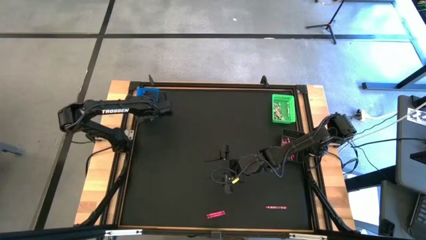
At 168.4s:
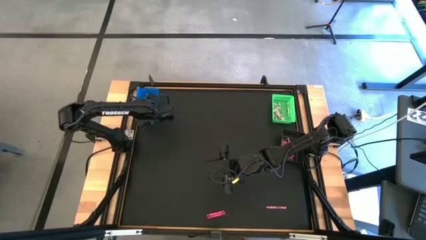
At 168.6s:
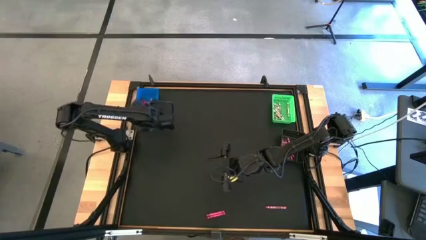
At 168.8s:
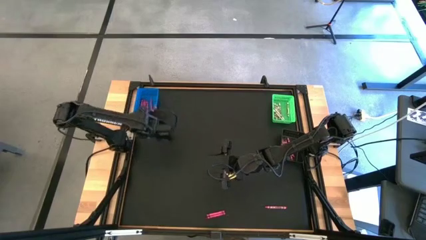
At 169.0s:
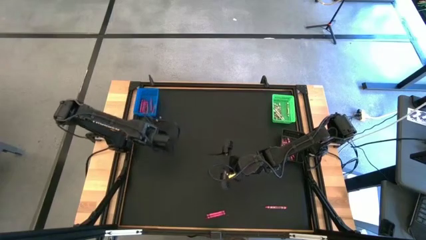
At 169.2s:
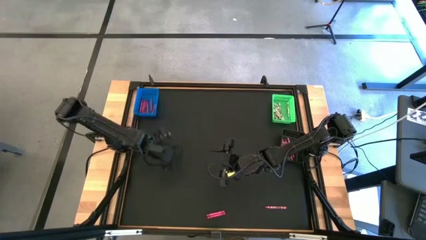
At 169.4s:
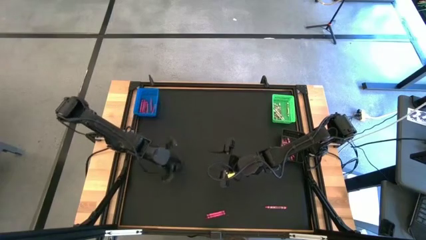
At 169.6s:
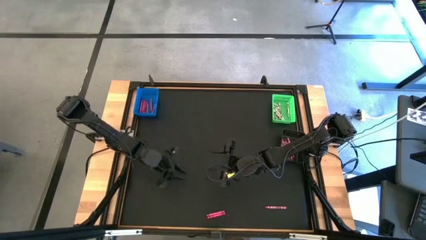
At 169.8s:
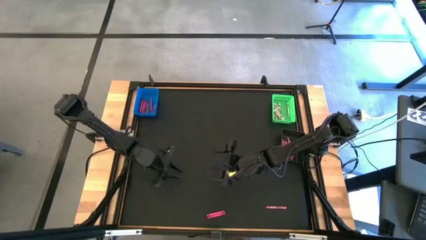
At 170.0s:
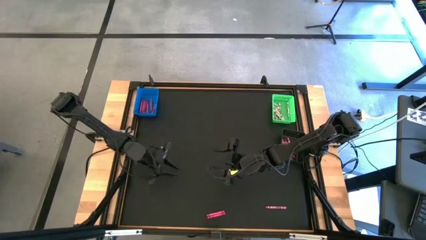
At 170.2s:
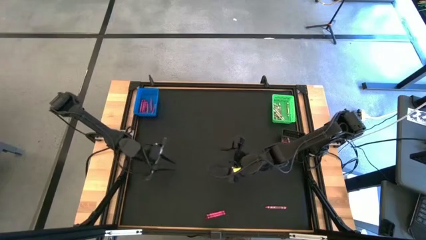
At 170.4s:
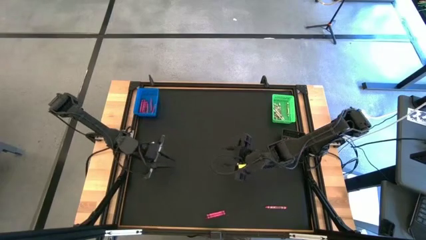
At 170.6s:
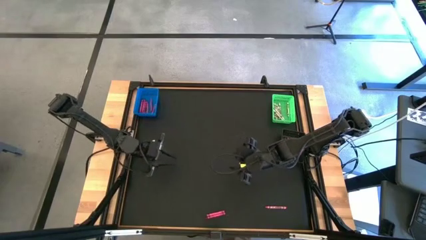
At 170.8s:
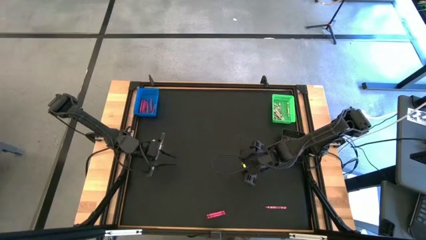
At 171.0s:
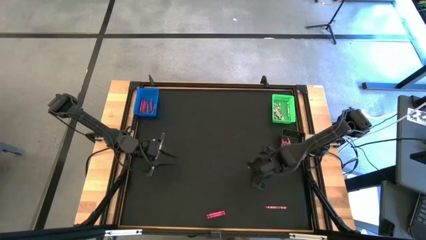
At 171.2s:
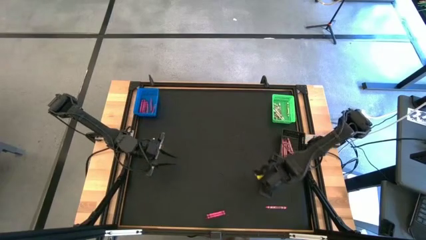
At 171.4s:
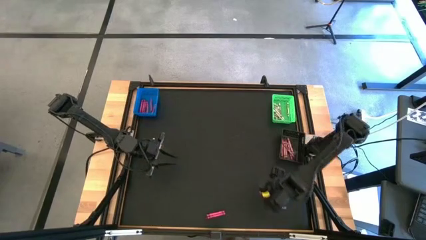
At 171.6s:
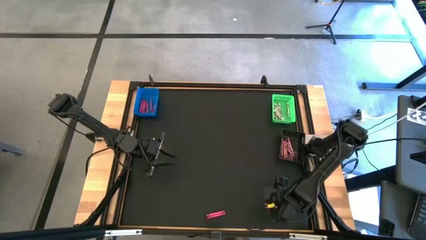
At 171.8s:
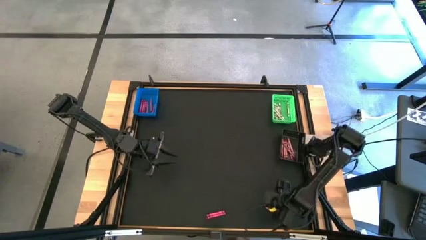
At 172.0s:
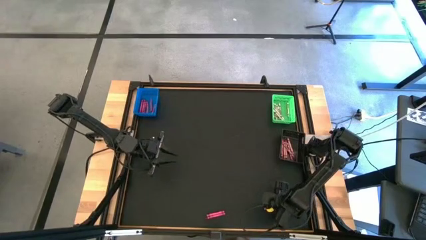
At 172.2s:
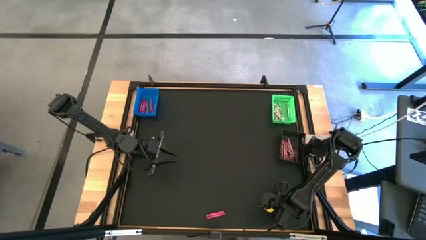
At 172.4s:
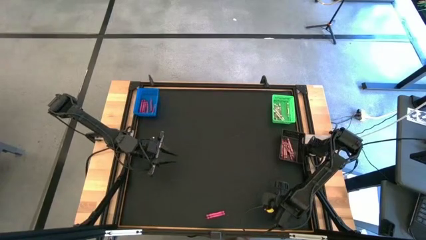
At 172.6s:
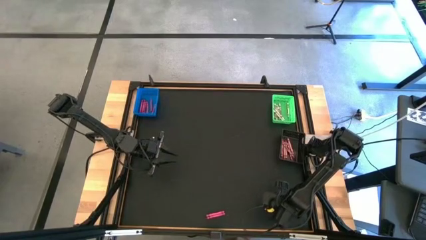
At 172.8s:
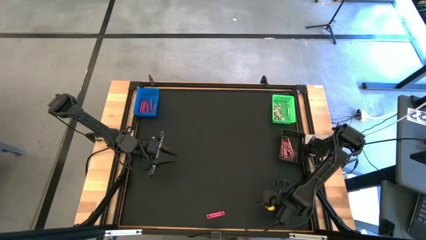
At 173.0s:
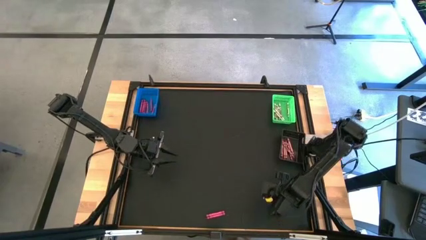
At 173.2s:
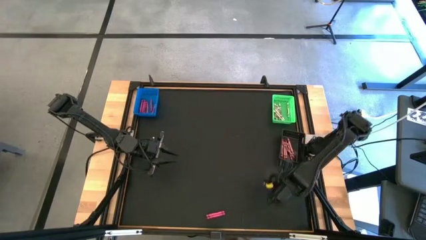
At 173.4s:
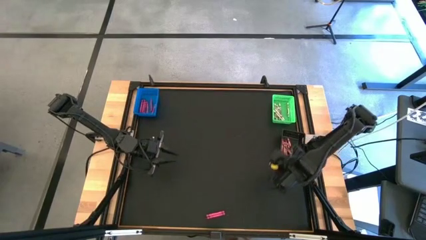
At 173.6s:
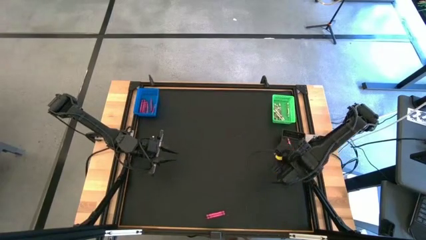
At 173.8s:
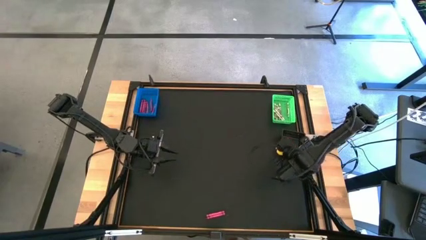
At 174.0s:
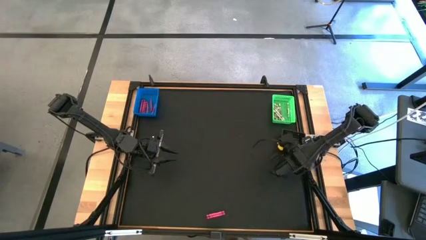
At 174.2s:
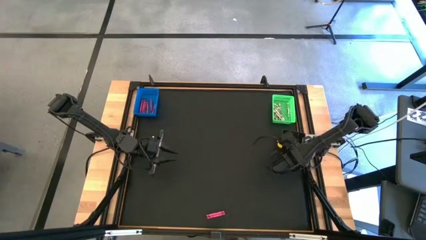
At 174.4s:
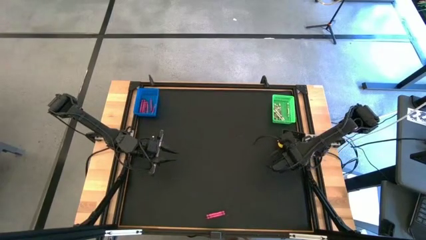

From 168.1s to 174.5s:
Task: Sort crayons
Put the pink crayon into the black bin

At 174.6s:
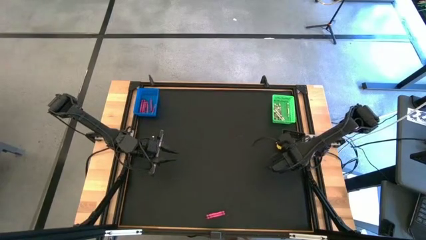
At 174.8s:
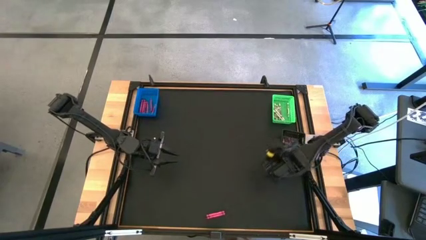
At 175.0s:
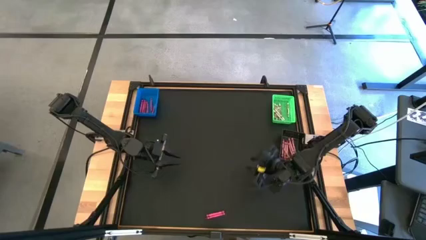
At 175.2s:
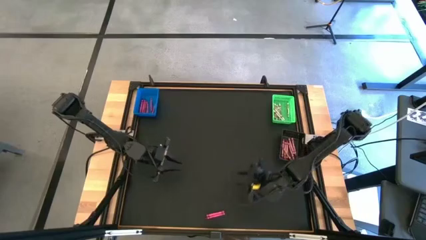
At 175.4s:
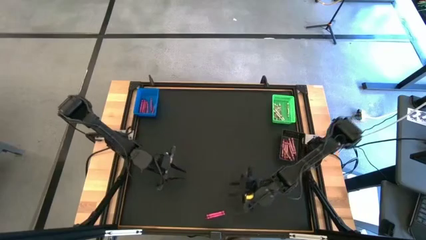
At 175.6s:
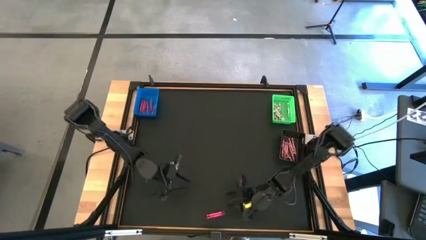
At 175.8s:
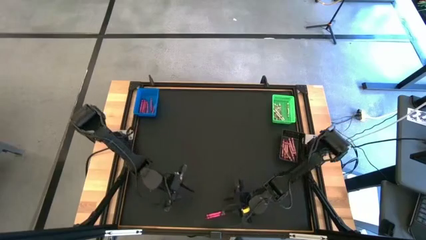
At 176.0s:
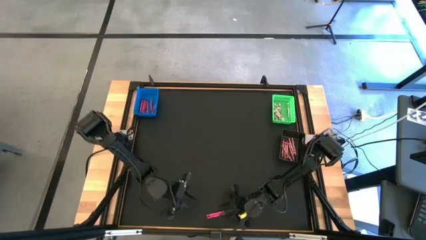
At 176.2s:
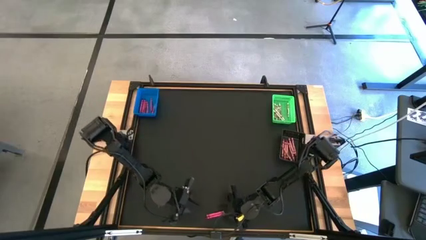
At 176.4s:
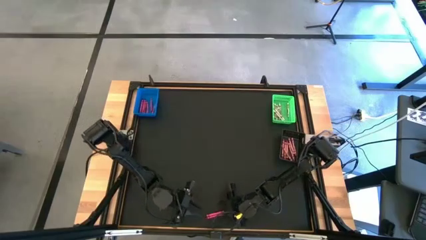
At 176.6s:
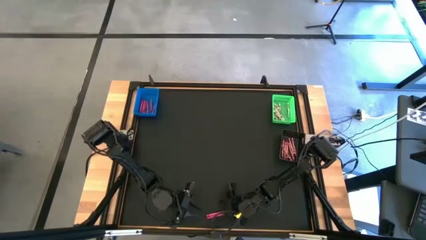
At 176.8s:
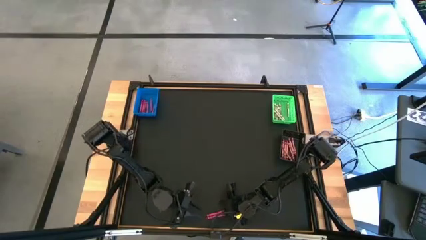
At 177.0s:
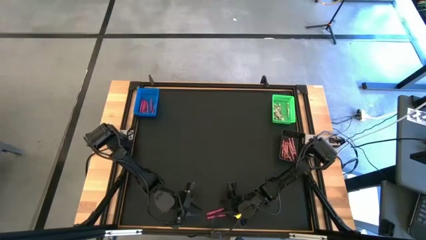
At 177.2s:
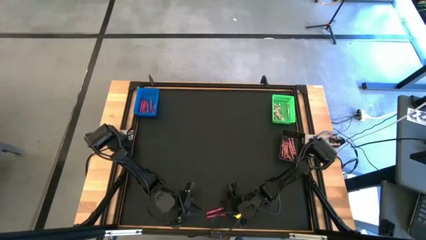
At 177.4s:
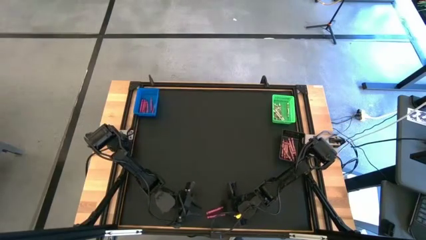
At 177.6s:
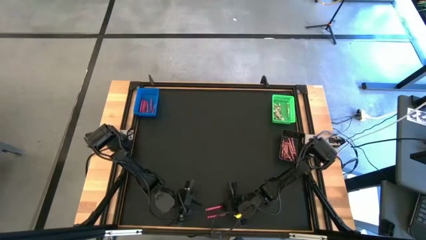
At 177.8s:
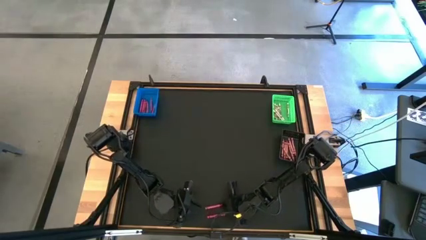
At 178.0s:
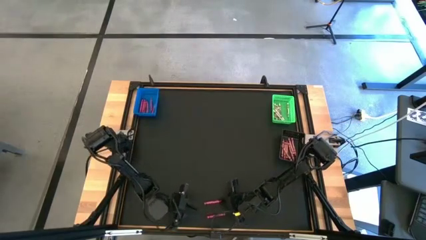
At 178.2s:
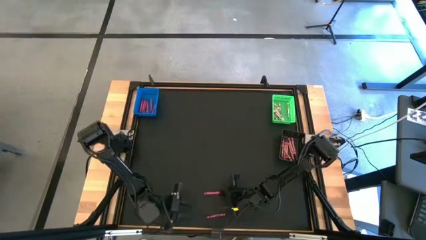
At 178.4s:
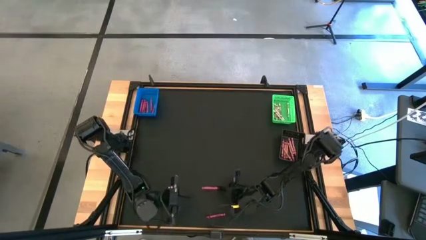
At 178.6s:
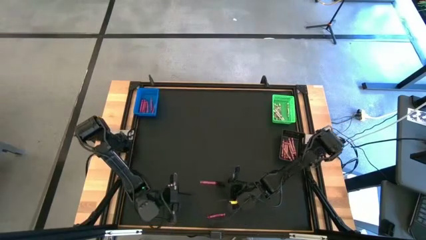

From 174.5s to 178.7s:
Put the red crayon into the blue bin

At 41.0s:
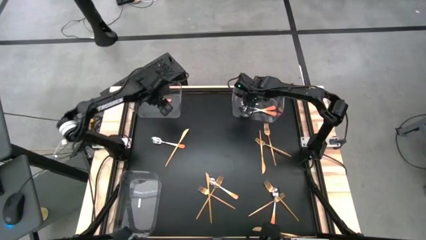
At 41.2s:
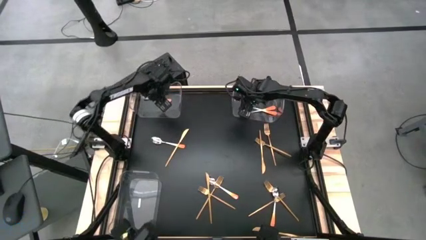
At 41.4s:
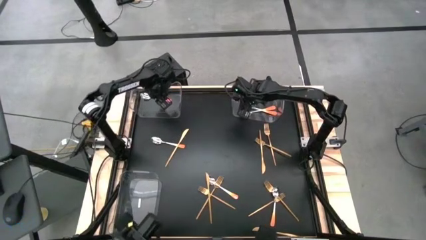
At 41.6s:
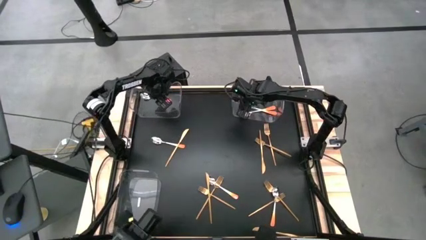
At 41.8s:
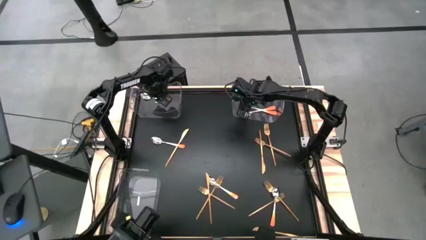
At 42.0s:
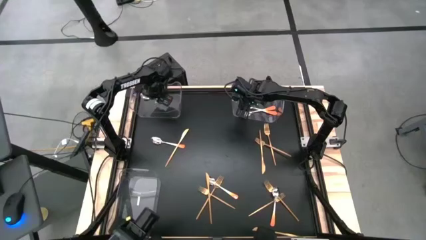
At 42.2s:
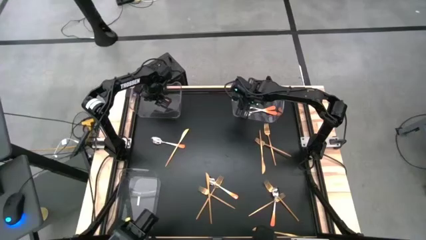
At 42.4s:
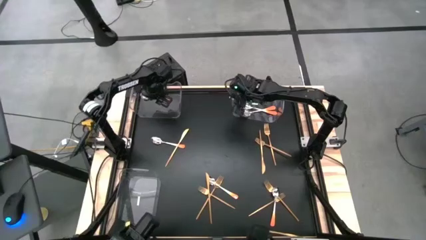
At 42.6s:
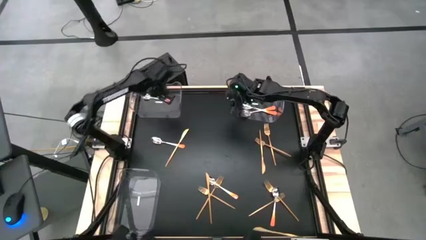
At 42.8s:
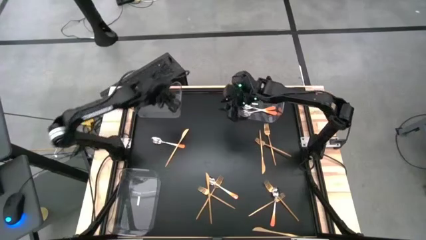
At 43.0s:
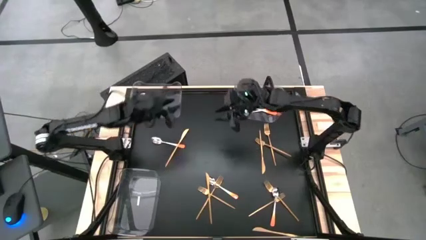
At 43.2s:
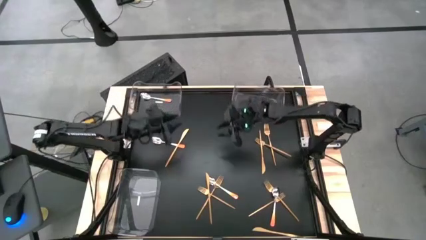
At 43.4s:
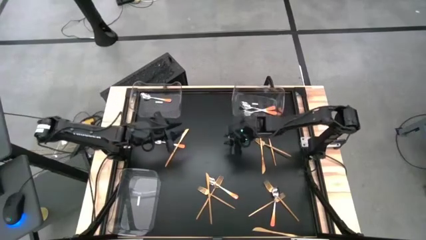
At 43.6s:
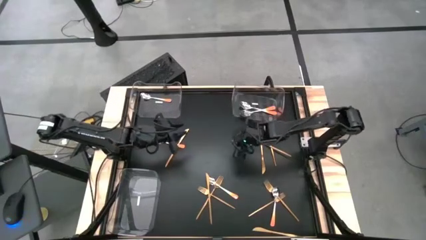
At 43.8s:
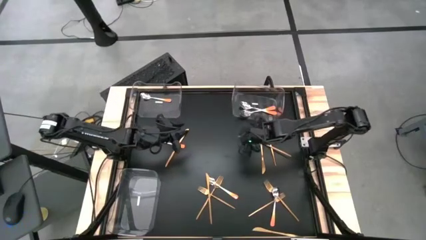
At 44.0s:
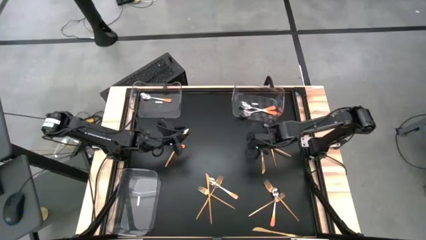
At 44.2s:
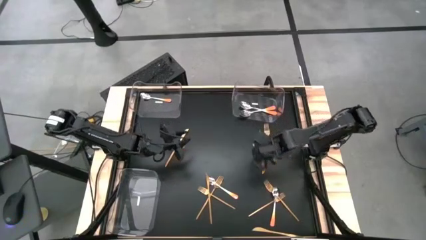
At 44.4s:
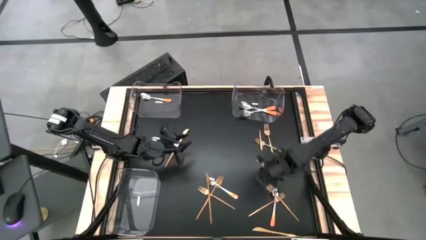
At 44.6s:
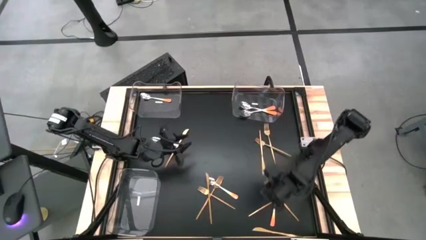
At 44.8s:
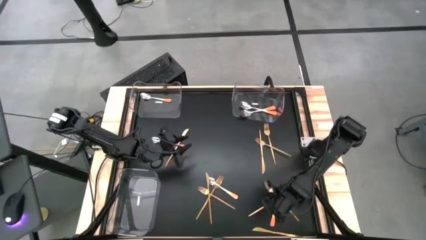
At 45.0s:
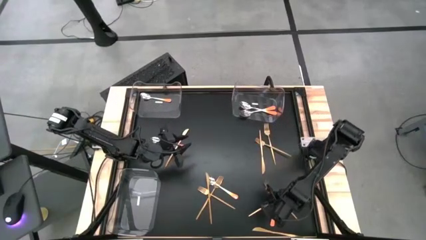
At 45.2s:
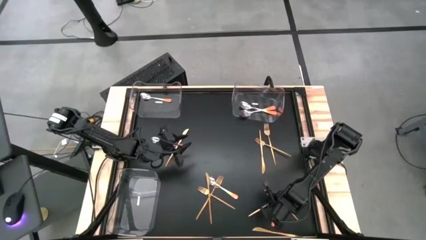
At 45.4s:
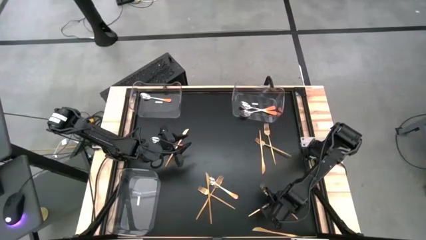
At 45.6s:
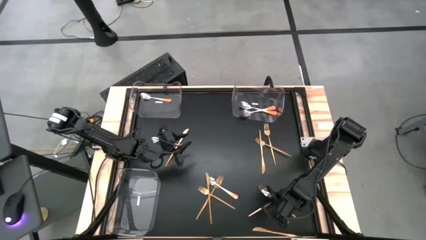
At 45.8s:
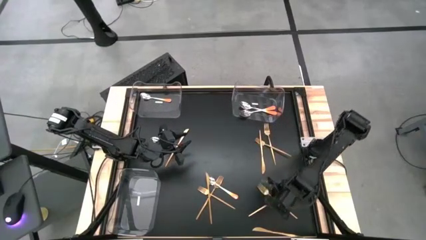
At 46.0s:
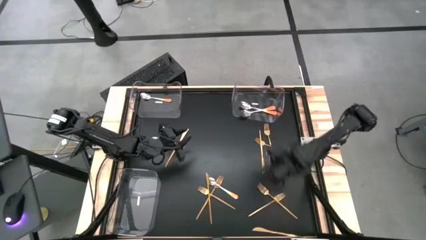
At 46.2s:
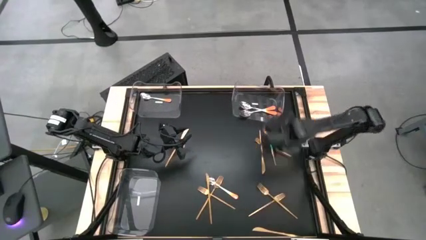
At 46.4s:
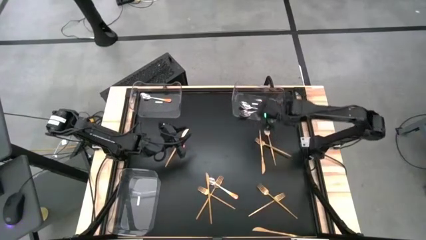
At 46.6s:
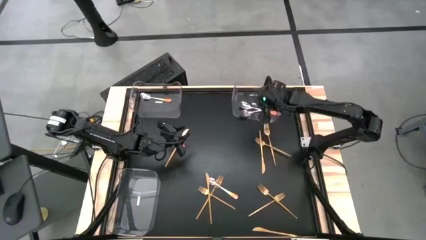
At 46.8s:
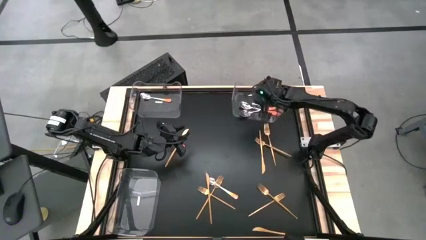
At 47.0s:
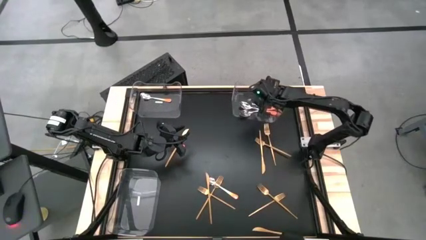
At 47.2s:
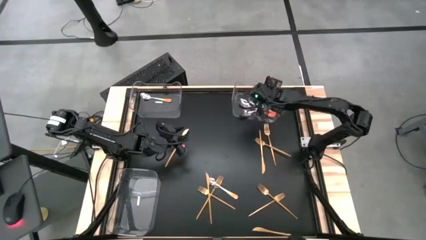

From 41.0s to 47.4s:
Task: Sort silverware by color (type)
Put the silver and orange spoon into the top right transparent bin

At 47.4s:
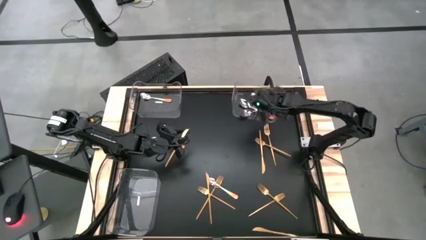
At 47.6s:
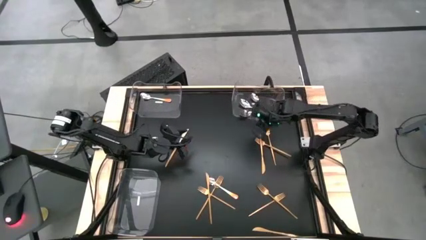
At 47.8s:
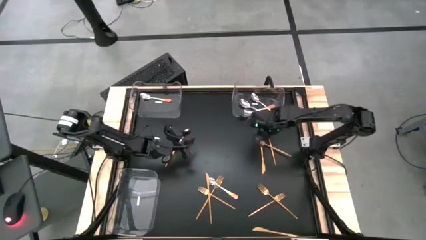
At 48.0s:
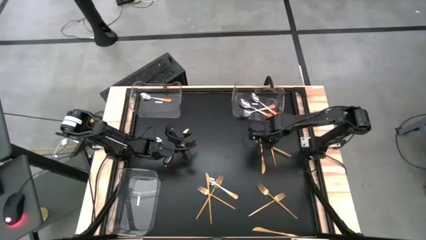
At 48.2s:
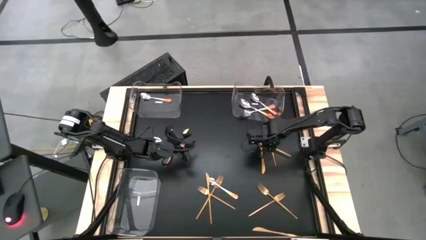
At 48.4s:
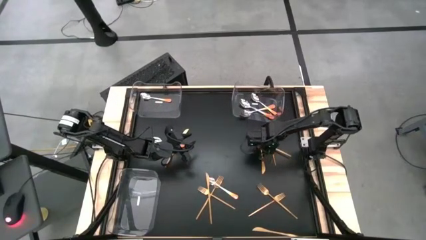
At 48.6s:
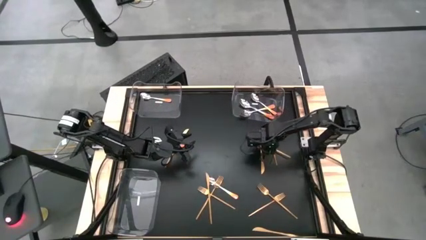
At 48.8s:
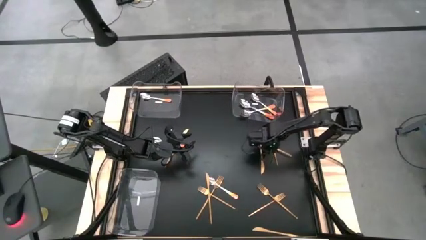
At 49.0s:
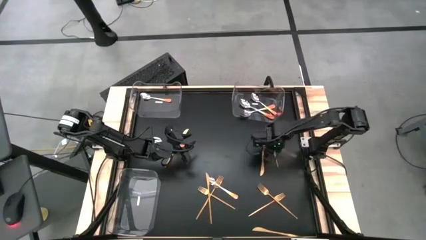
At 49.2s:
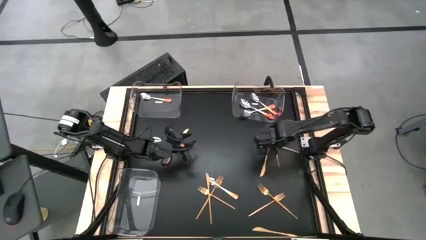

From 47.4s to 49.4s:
Put the gold fork into the bottom left transparent bin
